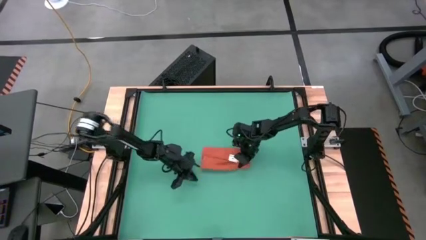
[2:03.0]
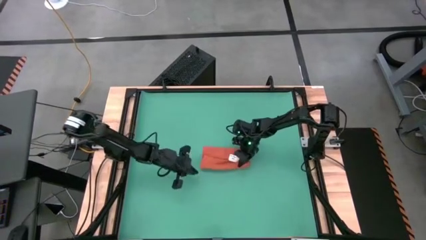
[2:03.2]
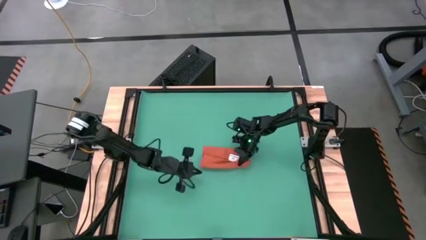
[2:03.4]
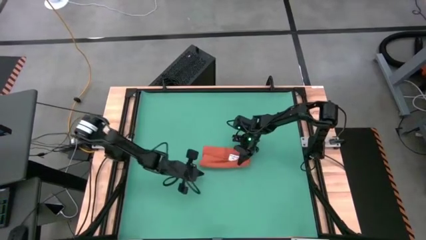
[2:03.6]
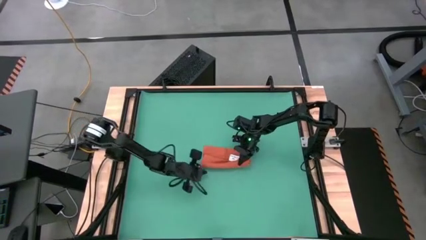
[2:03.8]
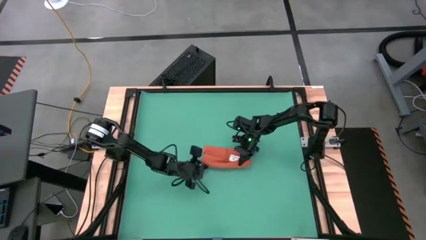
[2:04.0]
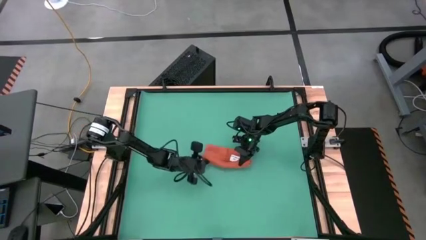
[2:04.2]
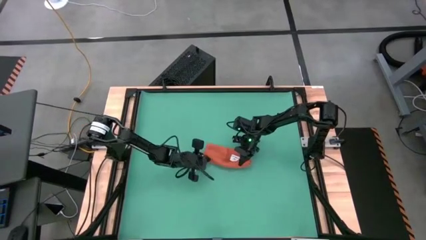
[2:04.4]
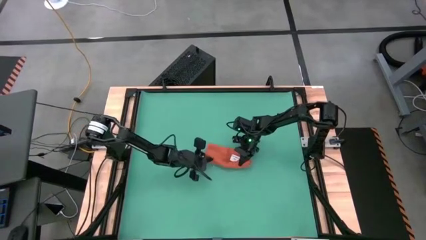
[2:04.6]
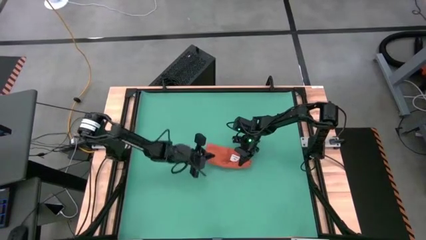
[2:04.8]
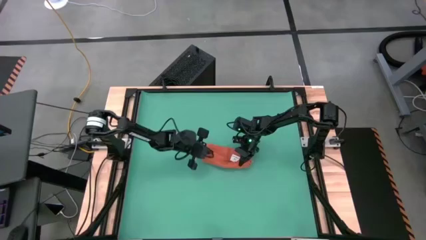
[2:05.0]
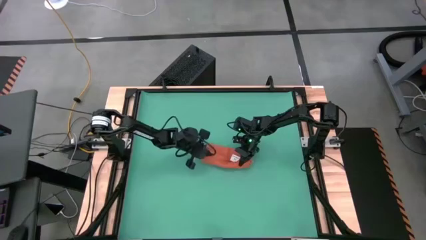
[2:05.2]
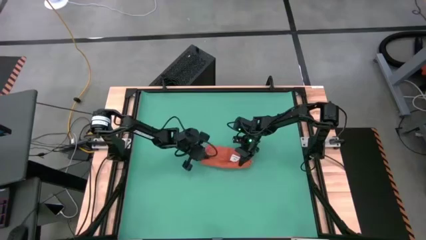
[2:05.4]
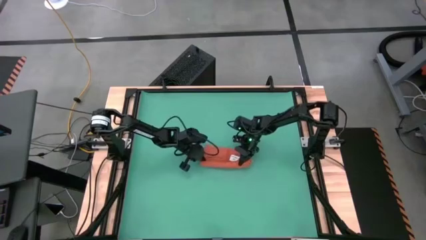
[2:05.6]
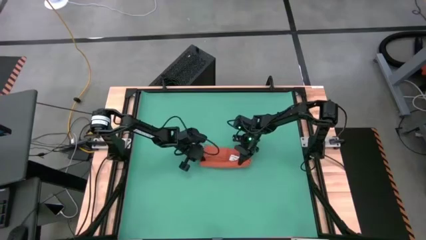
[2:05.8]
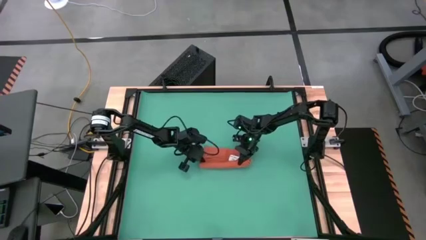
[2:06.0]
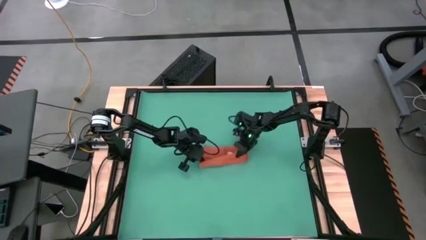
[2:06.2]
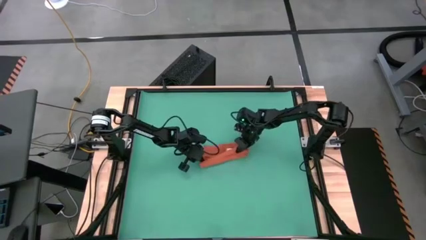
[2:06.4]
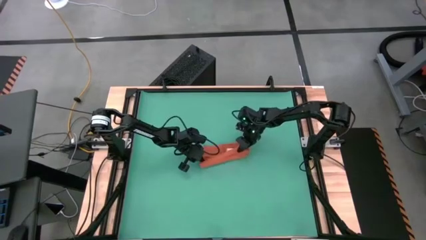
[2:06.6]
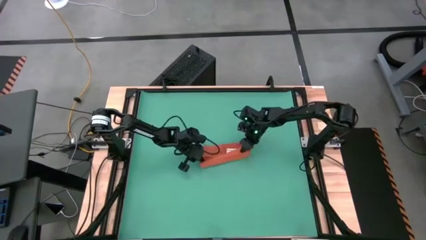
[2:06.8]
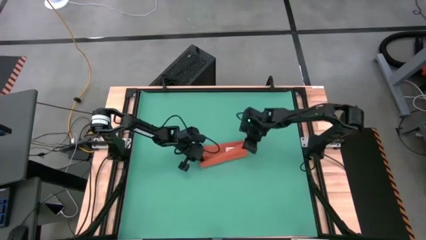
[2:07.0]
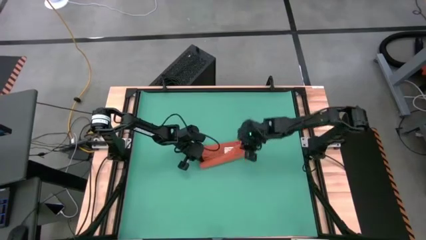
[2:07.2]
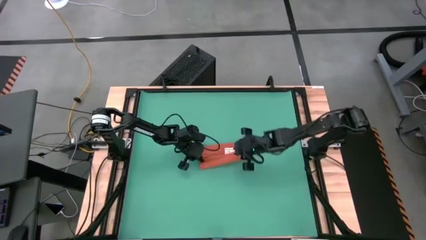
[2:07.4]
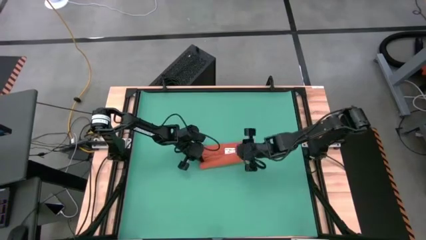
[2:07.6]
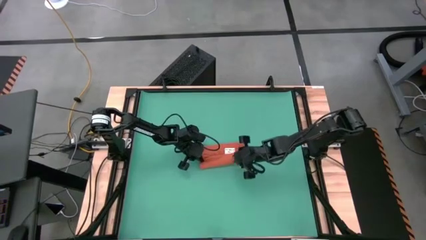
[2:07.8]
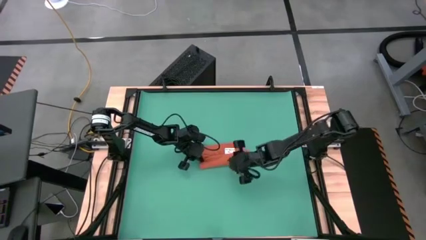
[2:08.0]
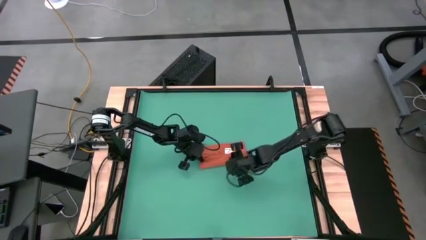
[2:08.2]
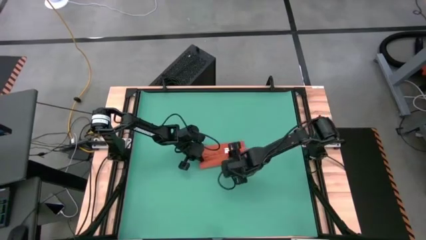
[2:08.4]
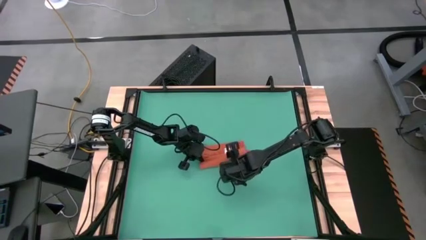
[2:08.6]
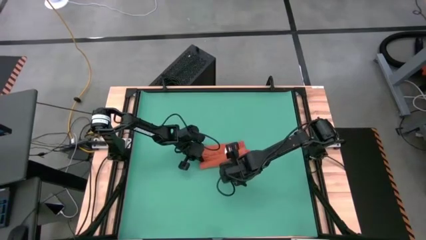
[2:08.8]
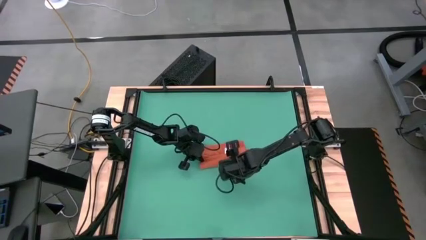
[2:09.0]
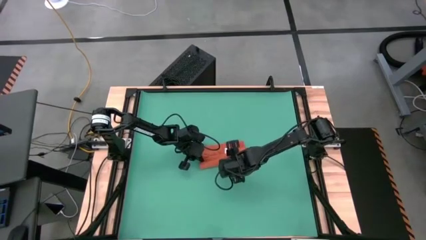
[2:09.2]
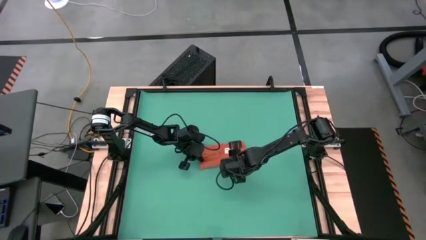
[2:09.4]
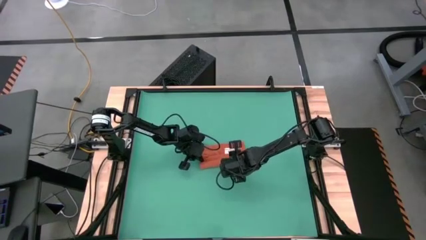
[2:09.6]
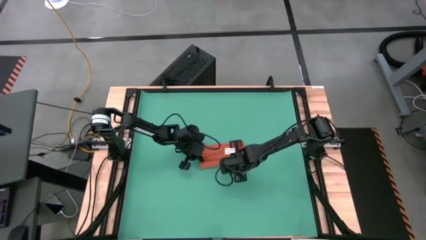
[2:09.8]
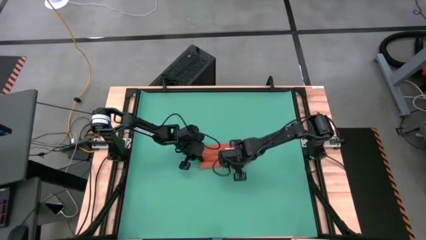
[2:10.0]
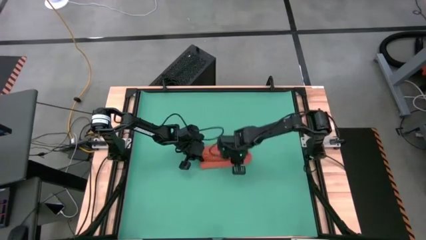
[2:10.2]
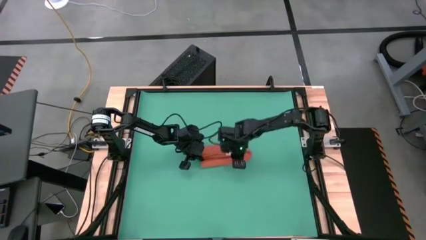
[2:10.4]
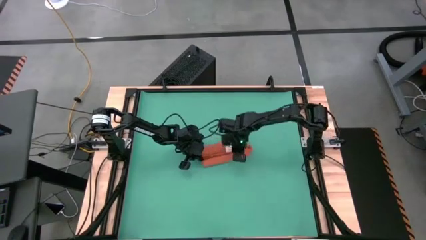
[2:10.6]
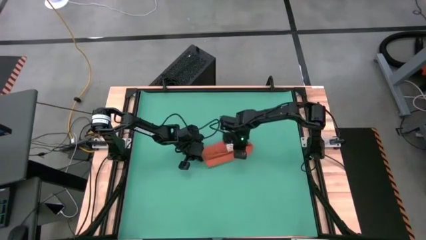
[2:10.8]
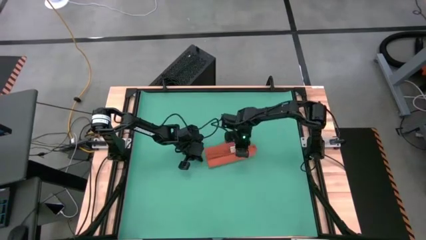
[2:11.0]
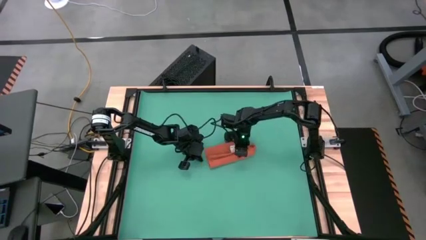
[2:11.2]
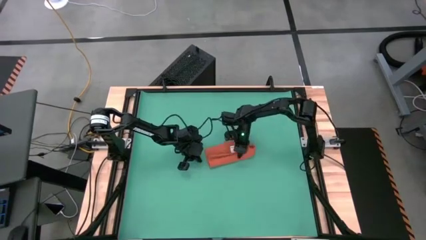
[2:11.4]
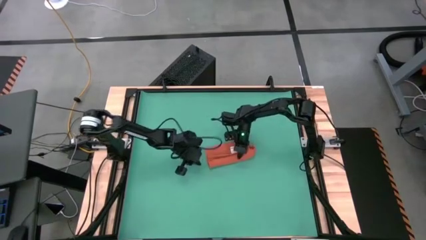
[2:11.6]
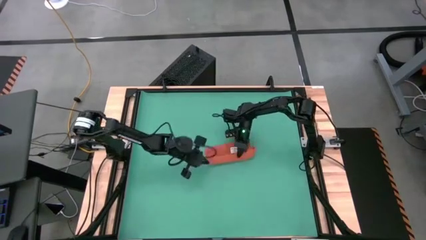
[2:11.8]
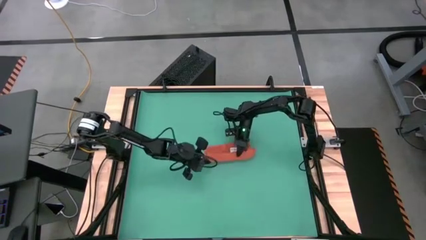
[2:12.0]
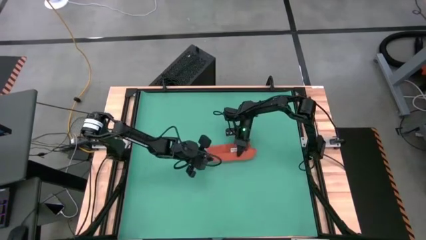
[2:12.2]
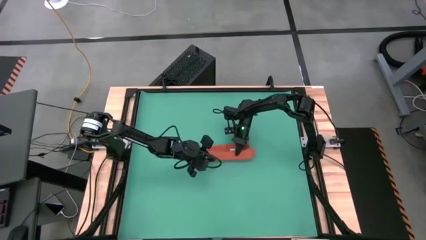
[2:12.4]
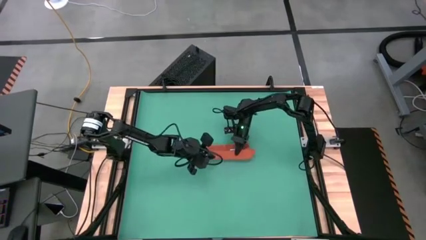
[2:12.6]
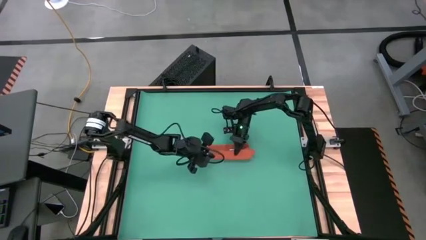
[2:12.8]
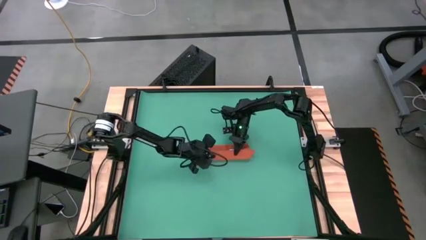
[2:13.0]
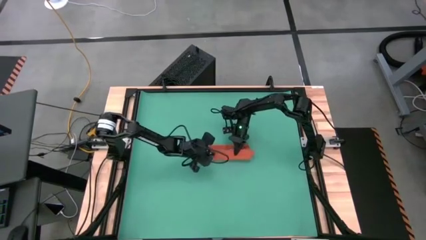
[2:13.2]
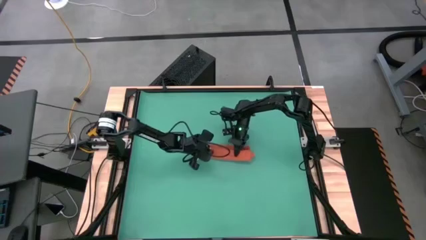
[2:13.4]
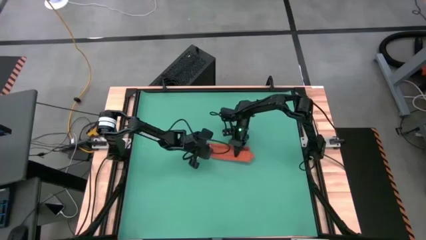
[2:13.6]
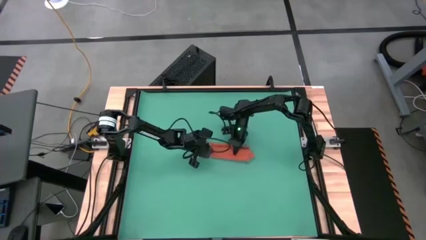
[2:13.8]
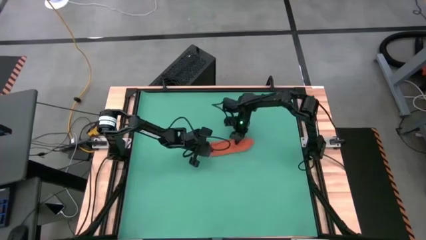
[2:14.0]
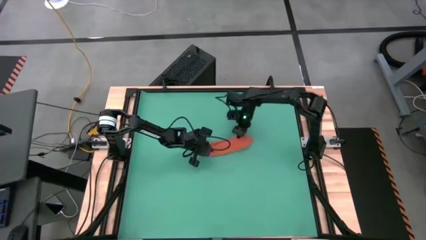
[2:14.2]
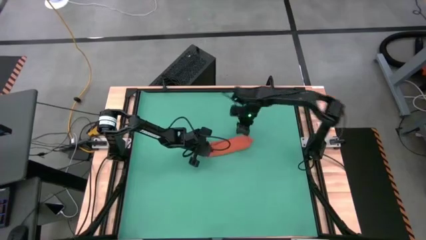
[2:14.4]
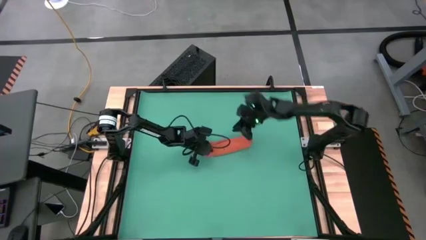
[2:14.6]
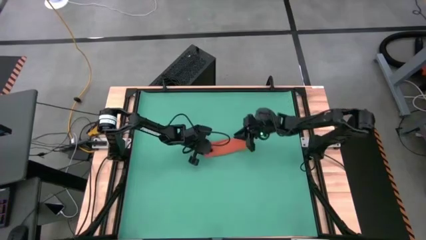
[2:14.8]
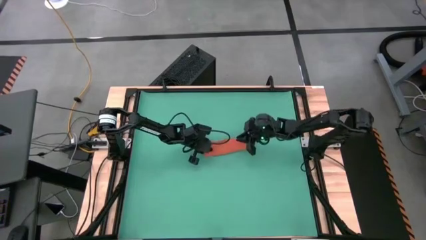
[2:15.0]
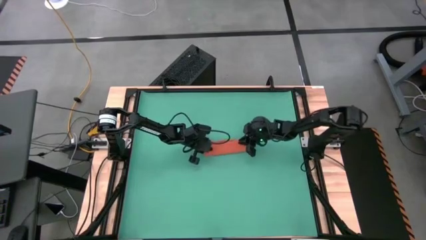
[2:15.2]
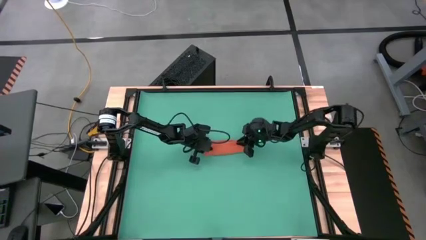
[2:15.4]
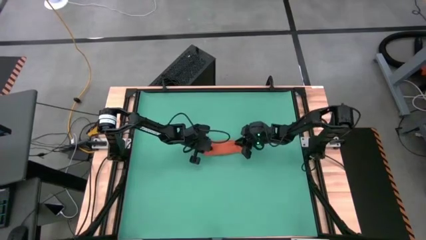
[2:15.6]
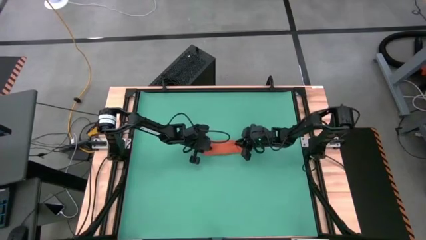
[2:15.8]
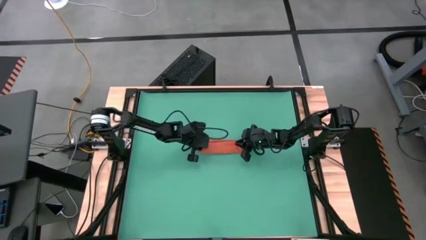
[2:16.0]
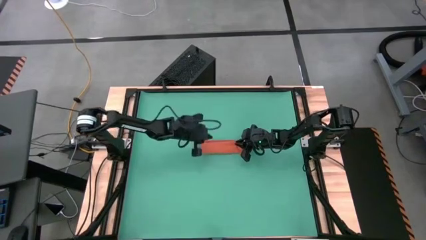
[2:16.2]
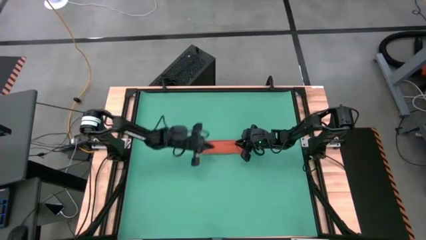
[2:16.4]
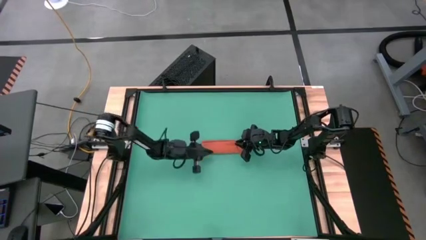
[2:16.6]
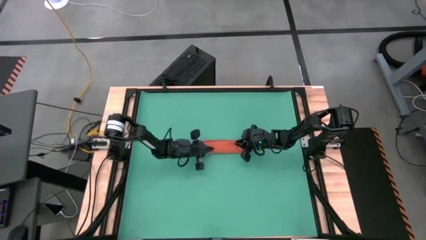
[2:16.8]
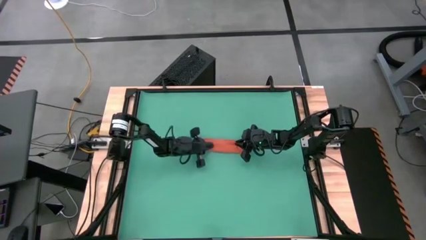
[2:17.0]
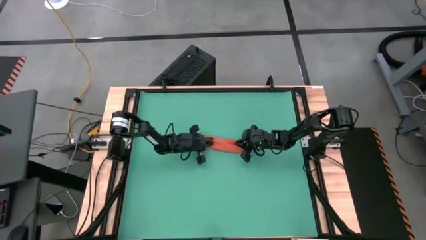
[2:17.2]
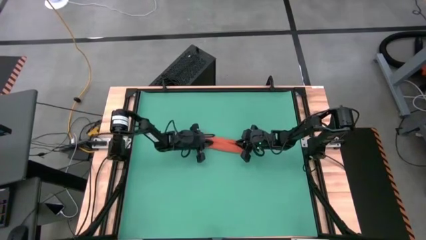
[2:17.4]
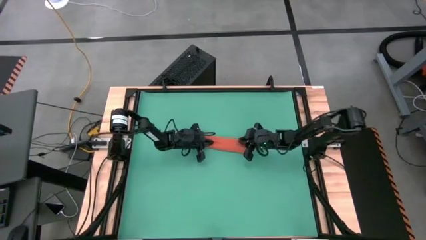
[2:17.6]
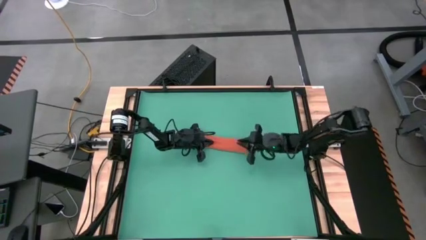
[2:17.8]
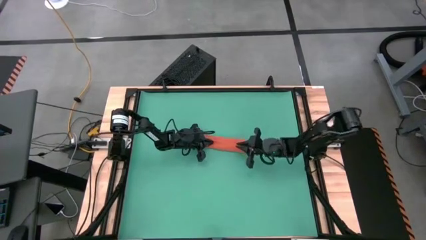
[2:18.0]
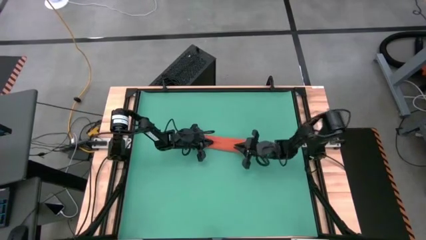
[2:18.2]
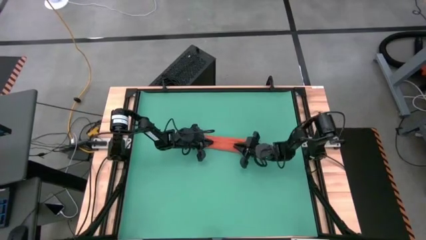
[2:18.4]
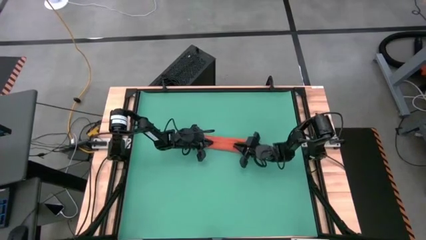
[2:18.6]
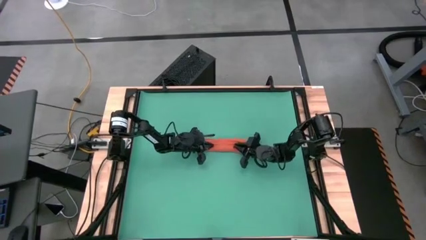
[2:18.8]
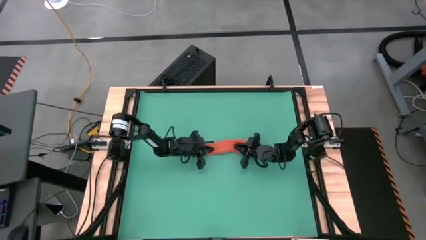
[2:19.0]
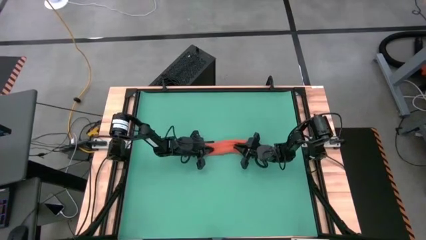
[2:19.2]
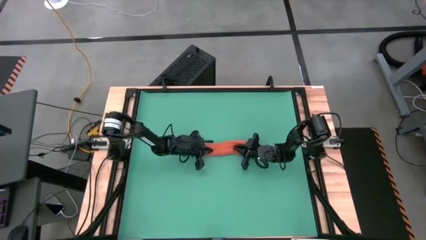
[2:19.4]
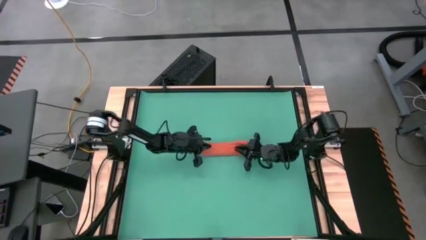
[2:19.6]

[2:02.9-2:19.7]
Task: Roll towel
Roll the orange towel
